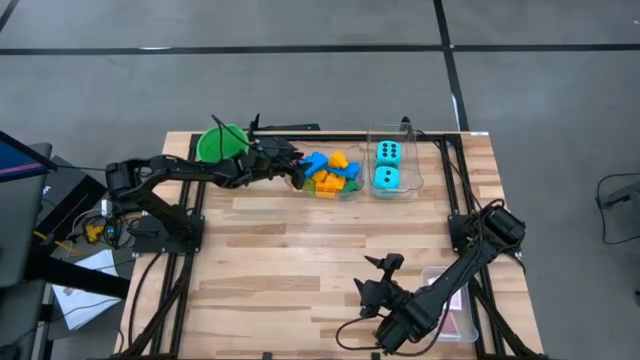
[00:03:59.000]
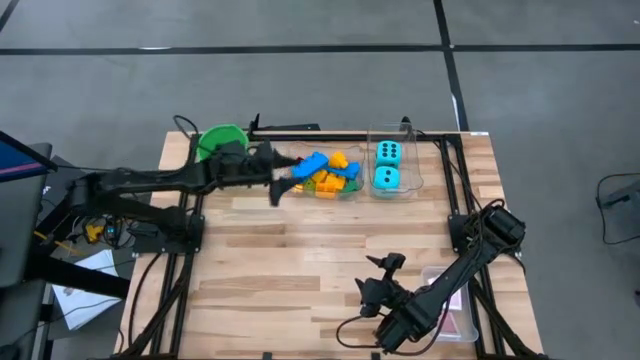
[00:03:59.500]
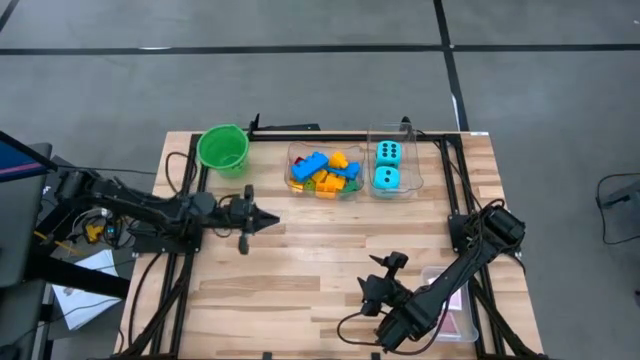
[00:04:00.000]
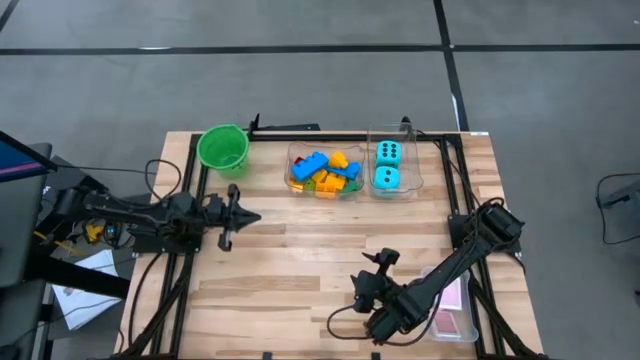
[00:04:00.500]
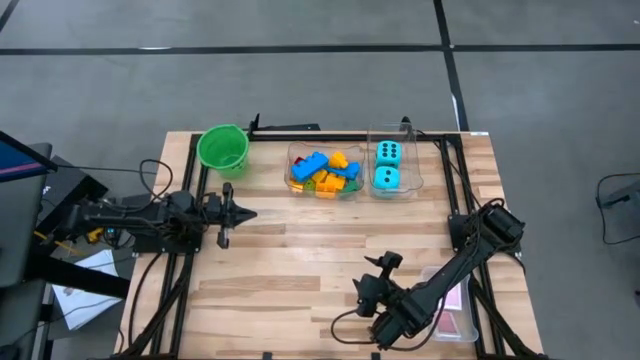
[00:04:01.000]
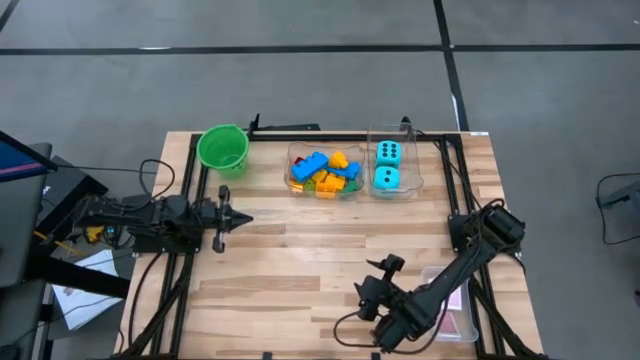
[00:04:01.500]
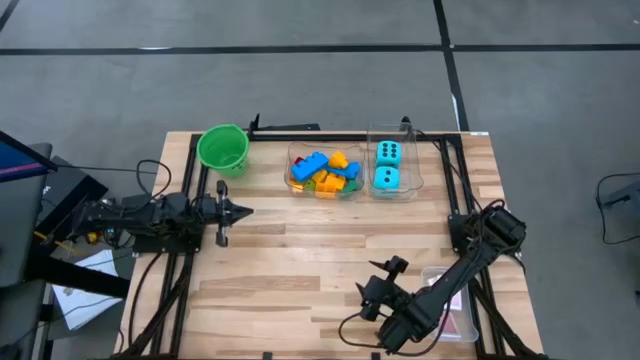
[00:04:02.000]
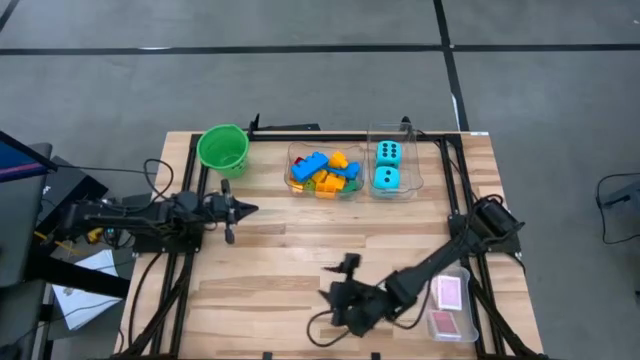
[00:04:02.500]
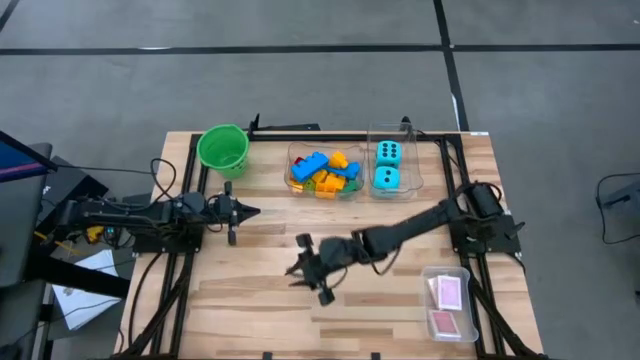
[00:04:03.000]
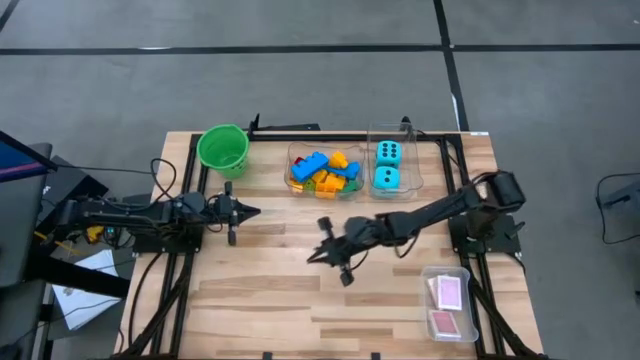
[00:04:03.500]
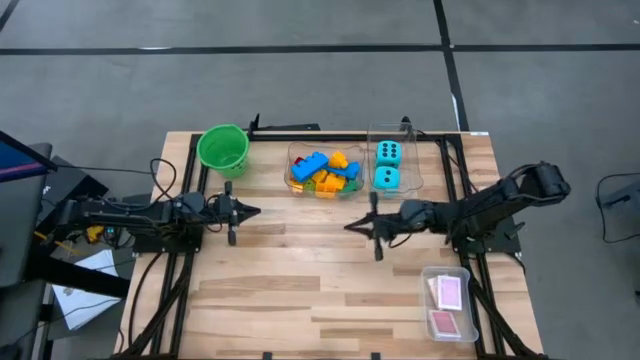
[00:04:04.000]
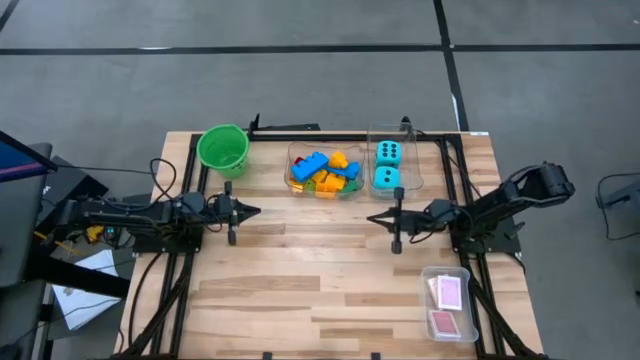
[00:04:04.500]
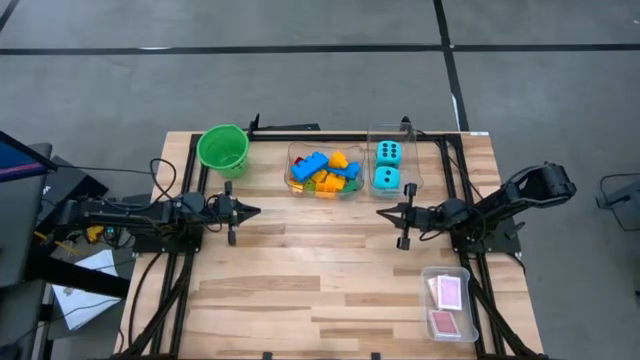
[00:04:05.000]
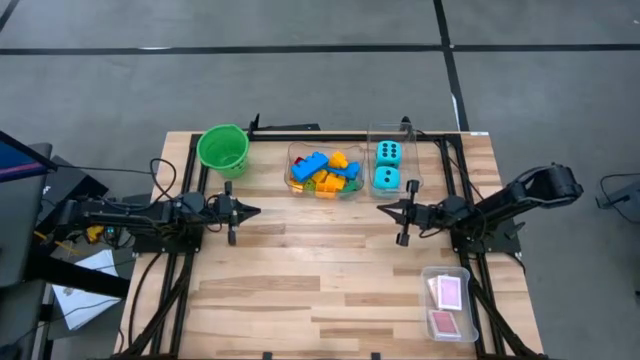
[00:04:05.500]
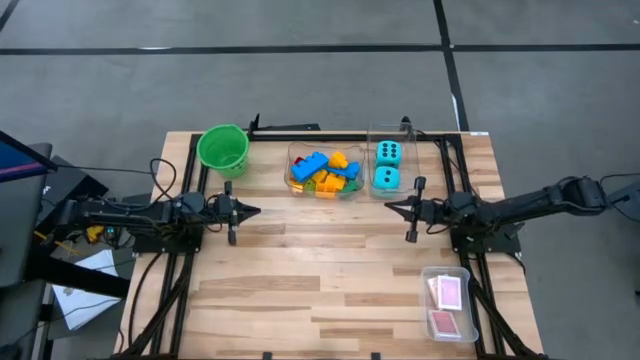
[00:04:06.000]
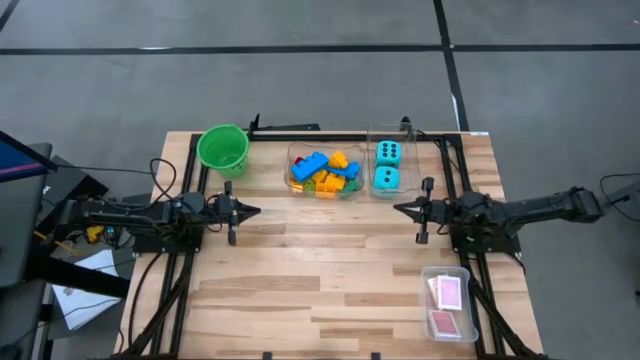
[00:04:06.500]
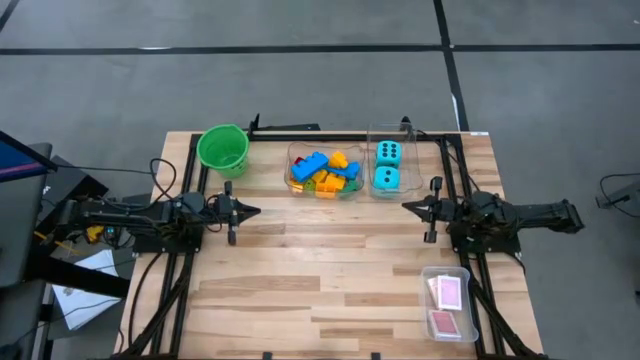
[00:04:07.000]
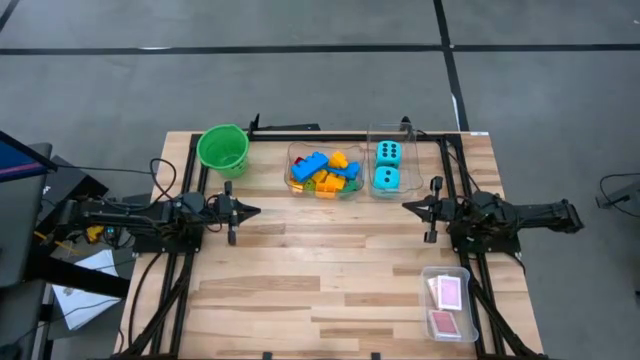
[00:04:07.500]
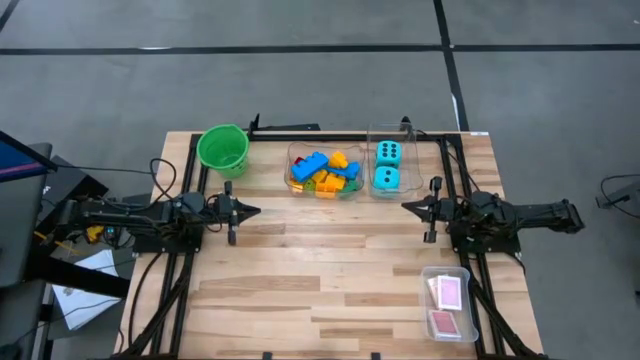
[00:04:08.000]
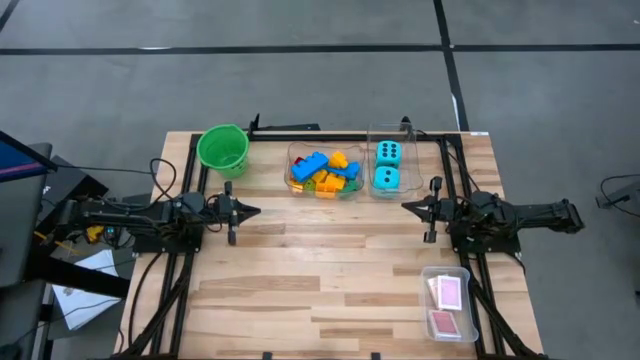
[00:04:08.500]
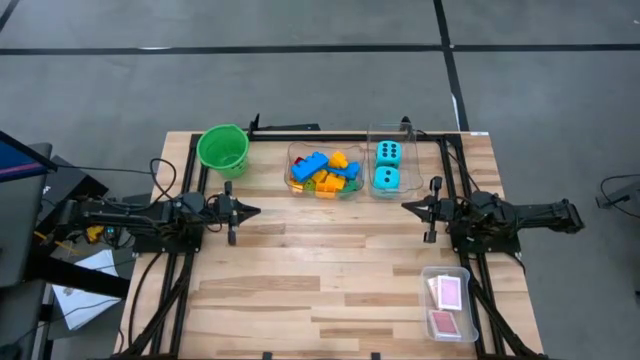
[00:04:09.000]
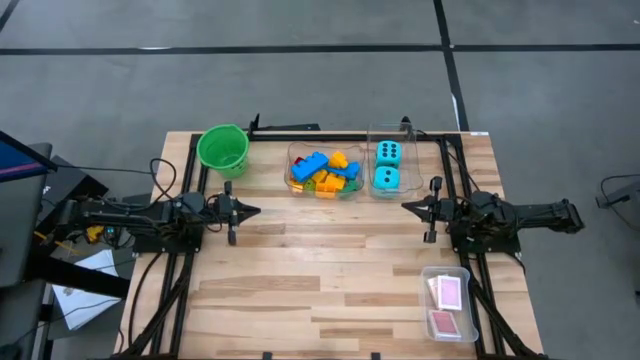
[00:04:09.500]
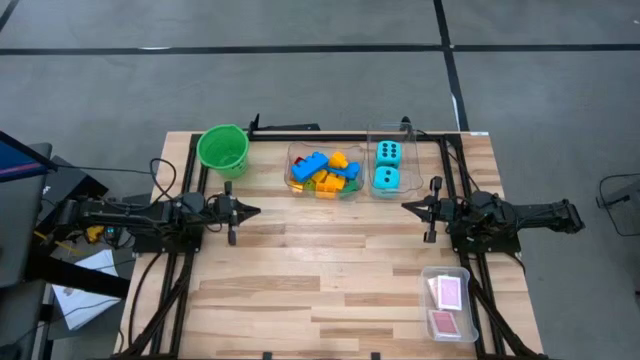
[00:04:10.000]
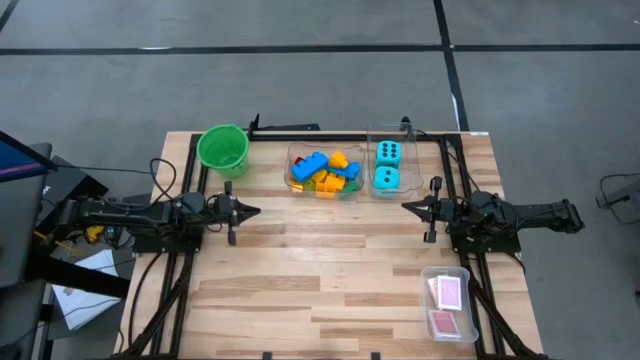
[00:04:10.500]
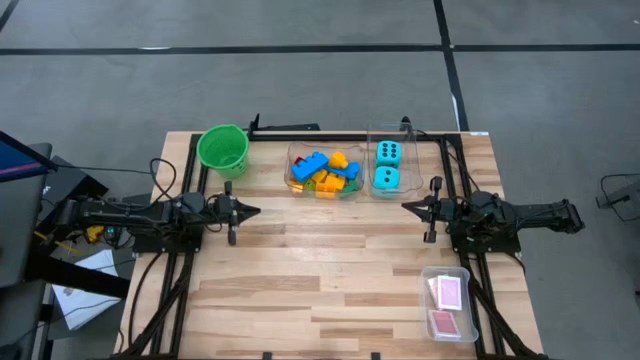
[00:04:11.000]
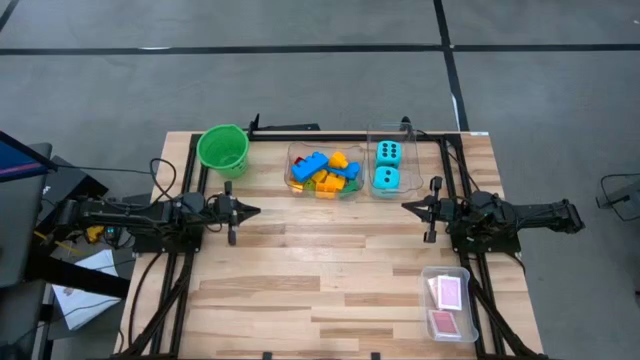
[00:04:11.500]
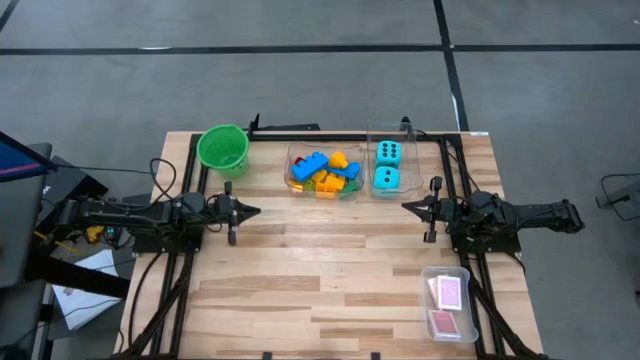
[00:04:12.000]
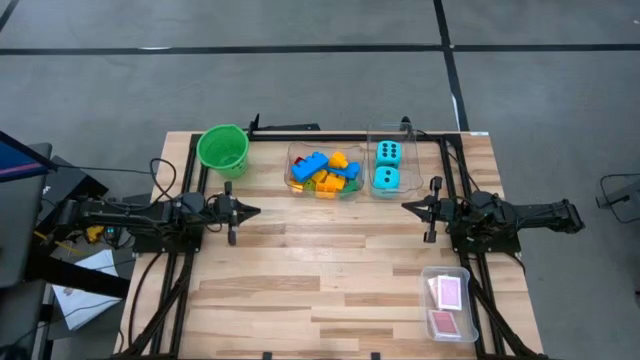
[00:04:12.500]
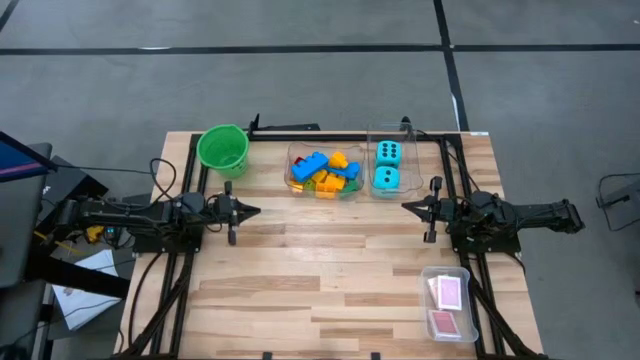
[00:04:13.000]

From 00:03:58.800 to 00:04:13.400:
Task: Pick & Place Toys
Return to Home Position

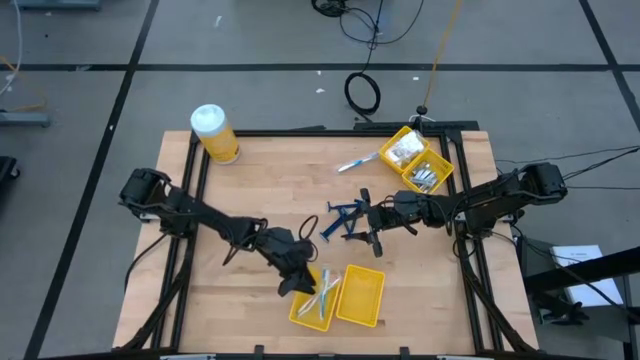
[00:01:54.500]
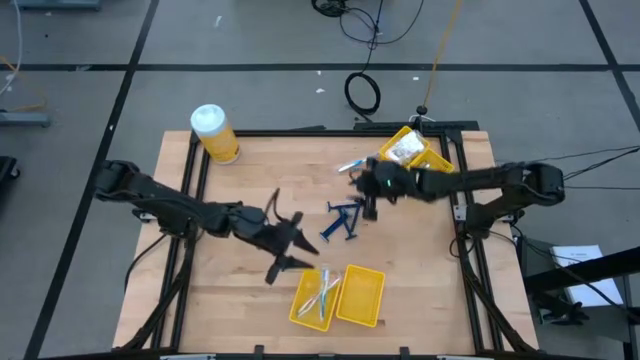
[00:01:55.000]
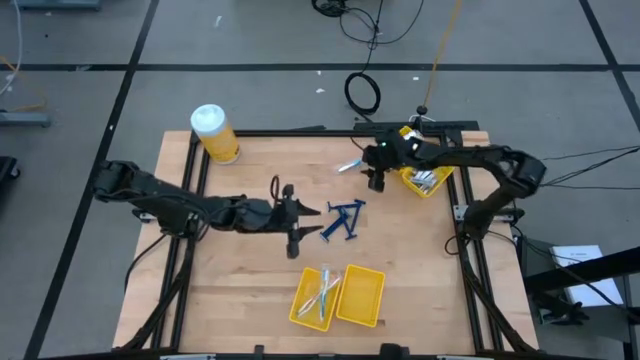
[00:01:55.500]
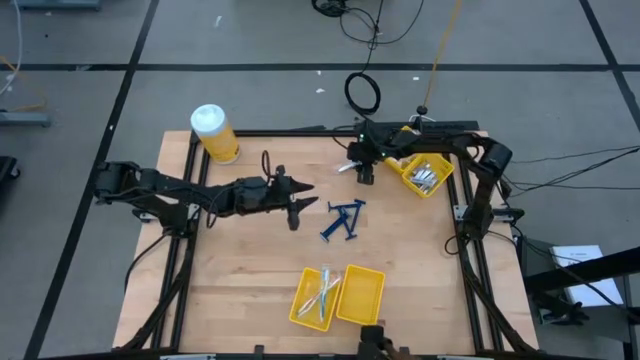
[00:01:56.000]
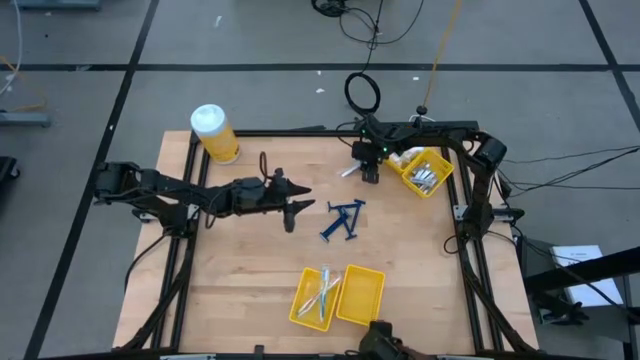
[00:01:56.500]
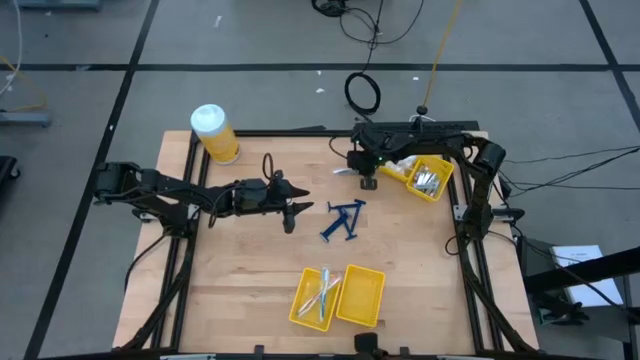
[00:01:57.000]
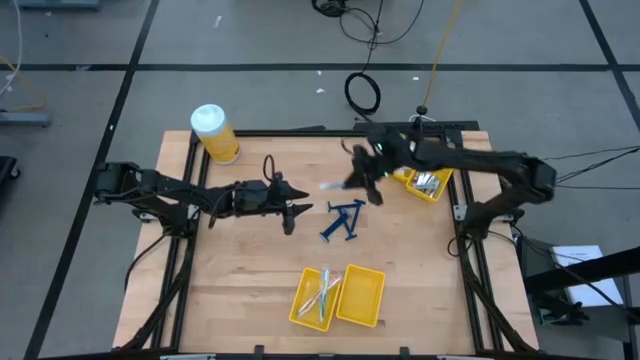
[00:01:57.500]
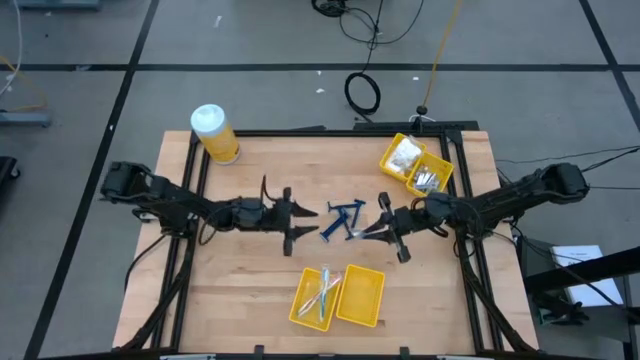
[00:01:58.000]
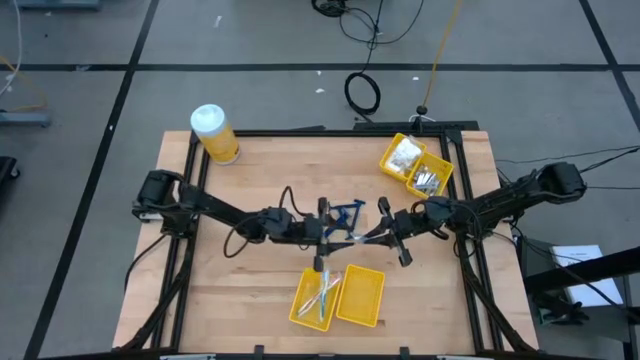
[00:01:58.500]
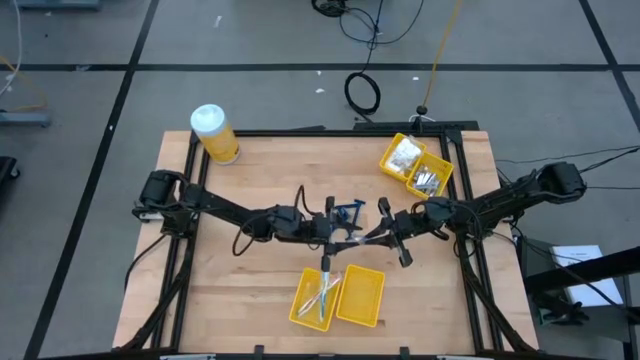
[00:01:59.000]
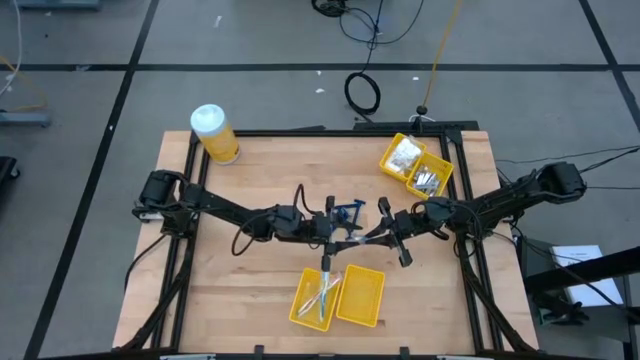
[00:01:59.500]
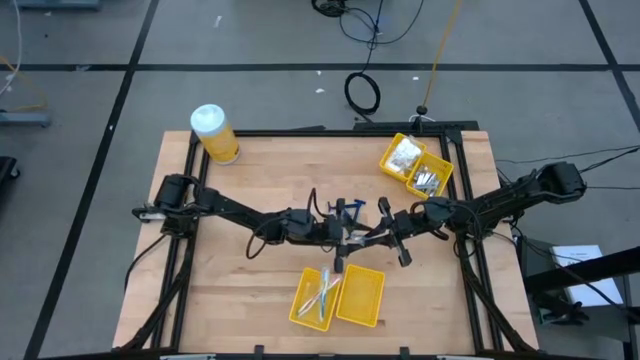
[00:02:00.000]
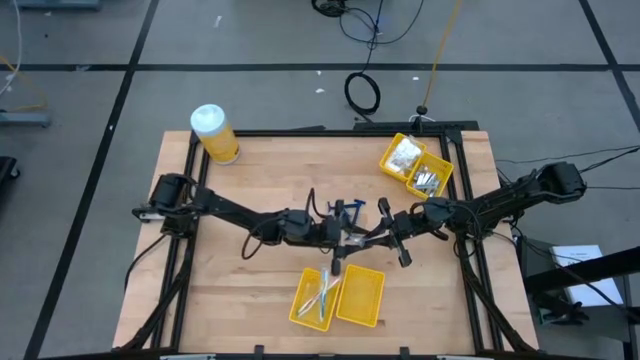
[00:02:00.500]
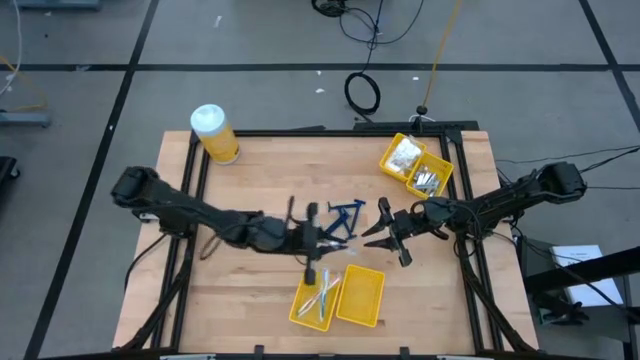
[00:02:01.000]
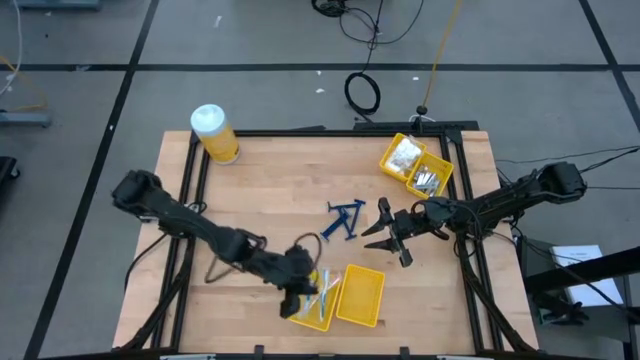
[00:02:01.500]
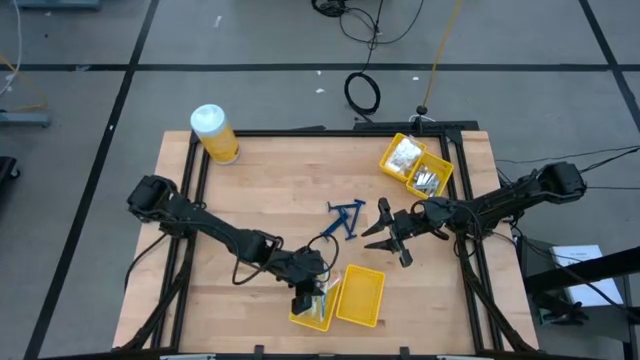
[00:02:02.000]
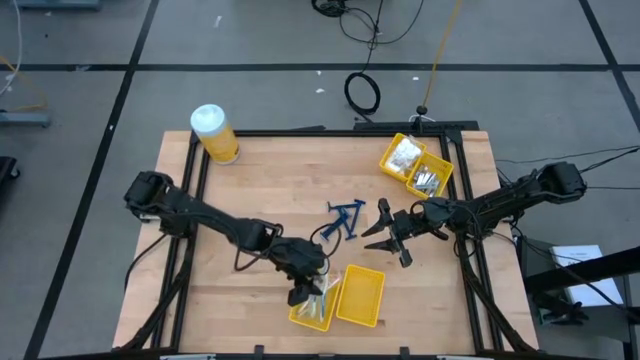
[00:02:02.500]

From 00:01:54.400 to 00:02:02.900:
Task: Pick & Place Travel size toiletries
Put the white and blue toothbrush into the bottom left yellow bin
